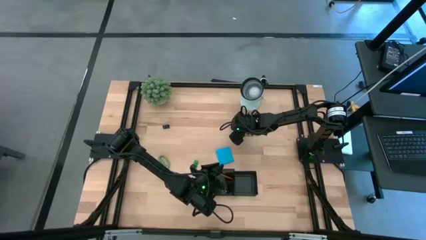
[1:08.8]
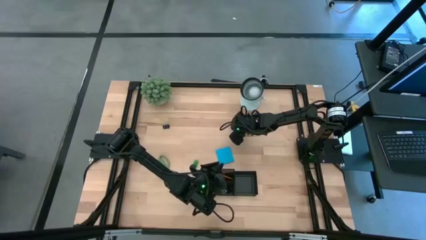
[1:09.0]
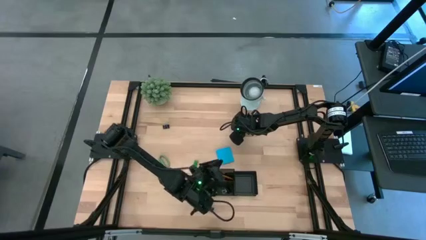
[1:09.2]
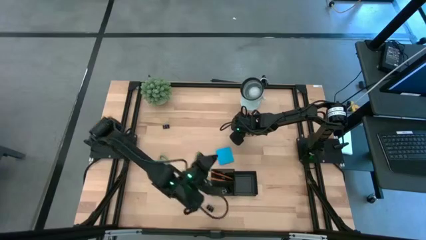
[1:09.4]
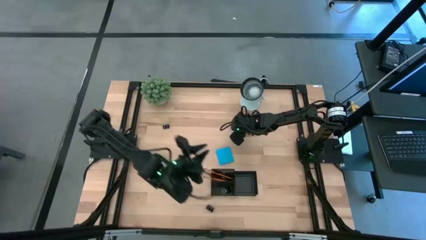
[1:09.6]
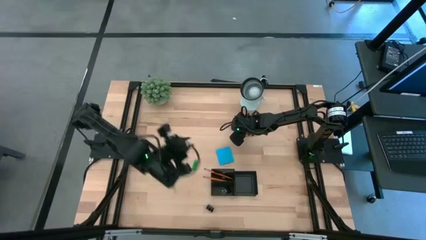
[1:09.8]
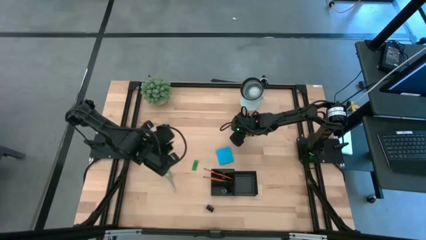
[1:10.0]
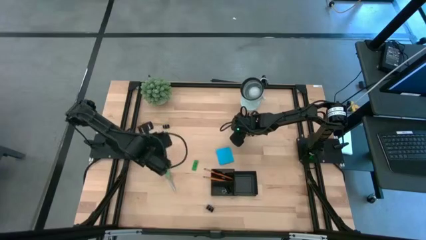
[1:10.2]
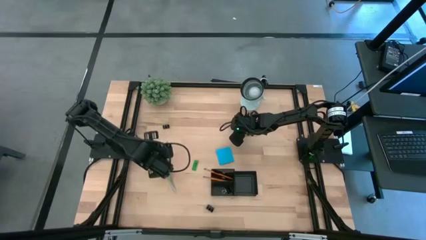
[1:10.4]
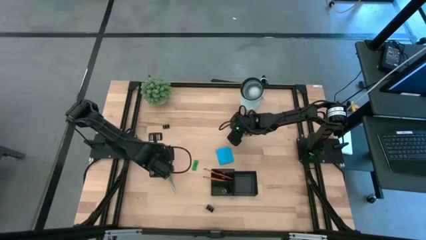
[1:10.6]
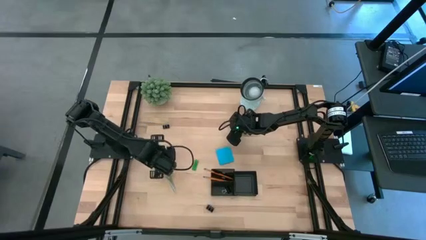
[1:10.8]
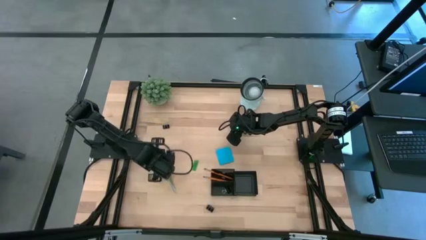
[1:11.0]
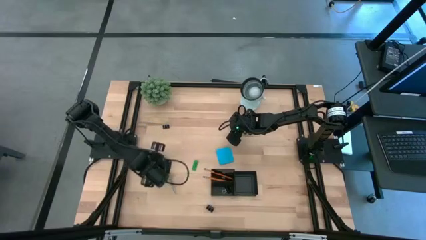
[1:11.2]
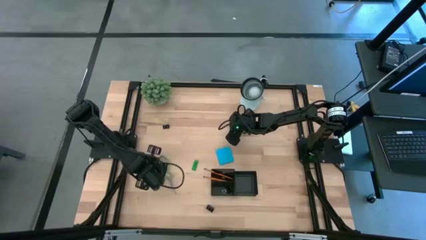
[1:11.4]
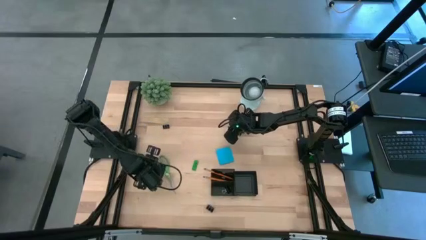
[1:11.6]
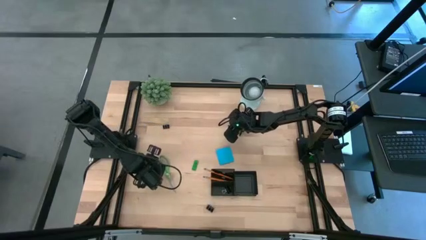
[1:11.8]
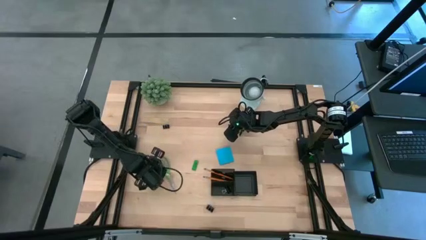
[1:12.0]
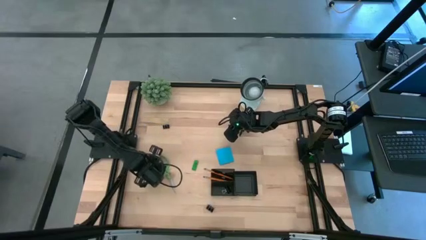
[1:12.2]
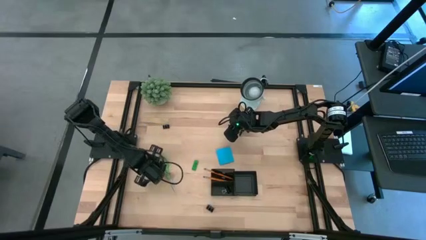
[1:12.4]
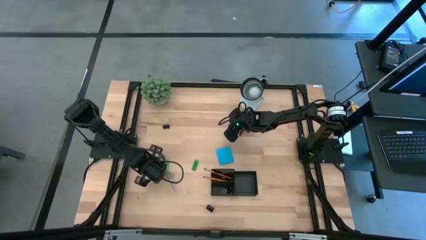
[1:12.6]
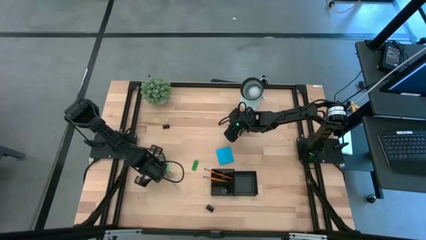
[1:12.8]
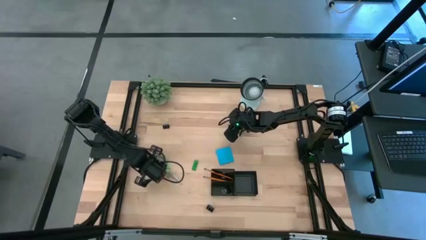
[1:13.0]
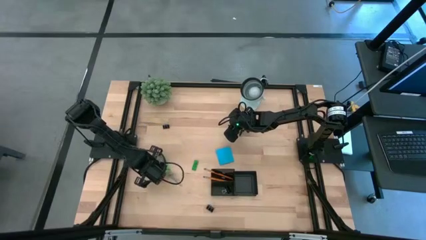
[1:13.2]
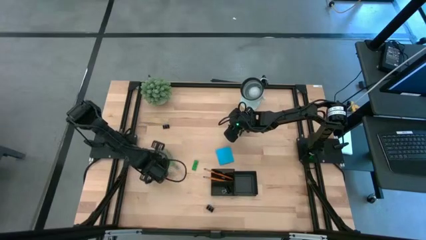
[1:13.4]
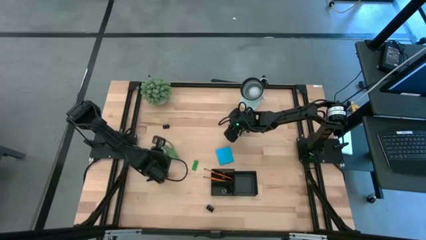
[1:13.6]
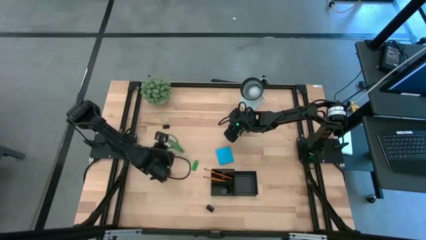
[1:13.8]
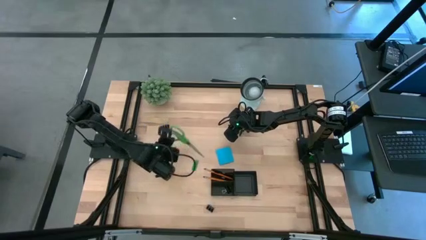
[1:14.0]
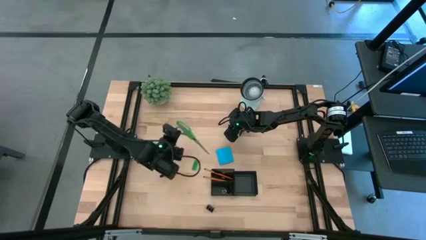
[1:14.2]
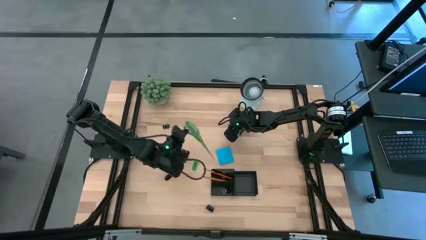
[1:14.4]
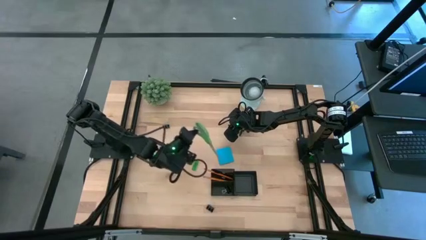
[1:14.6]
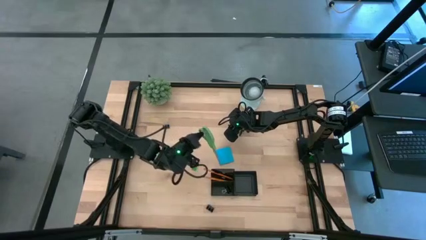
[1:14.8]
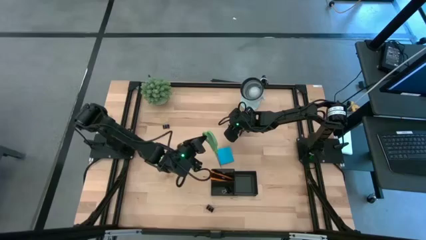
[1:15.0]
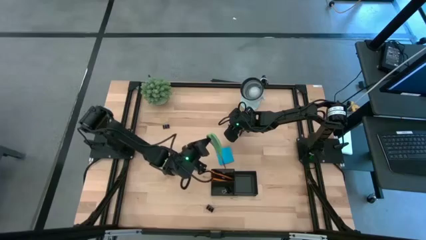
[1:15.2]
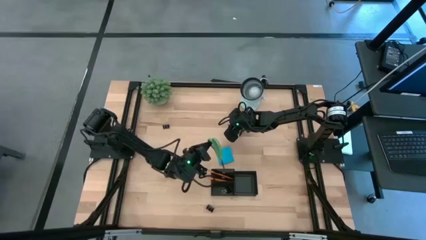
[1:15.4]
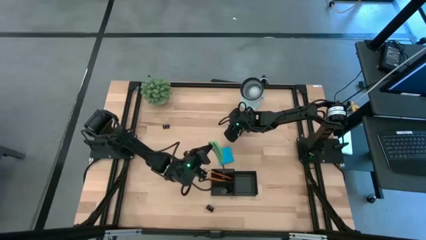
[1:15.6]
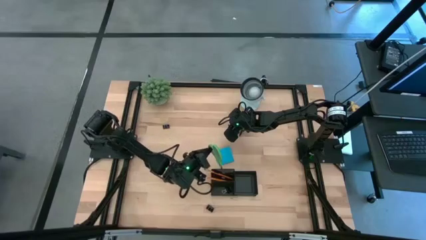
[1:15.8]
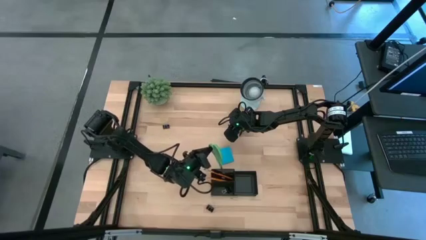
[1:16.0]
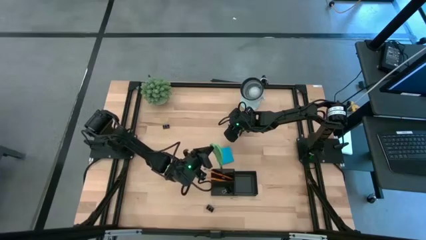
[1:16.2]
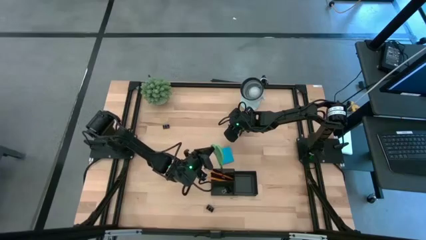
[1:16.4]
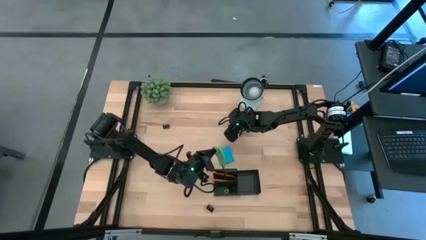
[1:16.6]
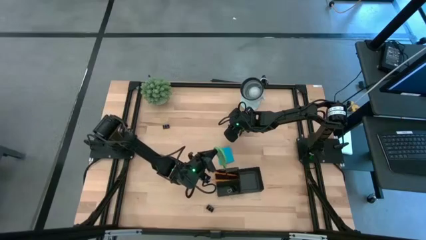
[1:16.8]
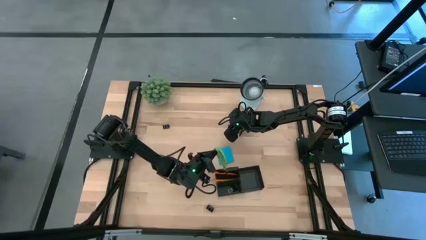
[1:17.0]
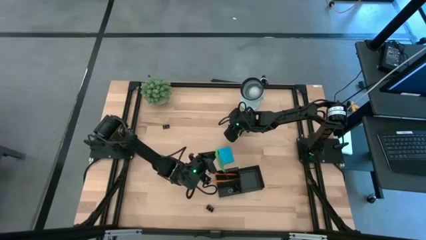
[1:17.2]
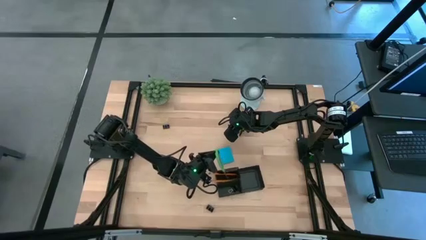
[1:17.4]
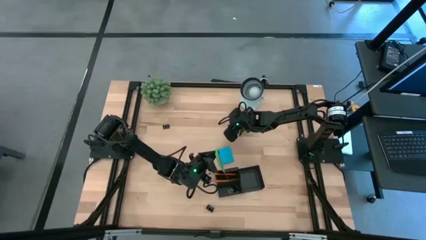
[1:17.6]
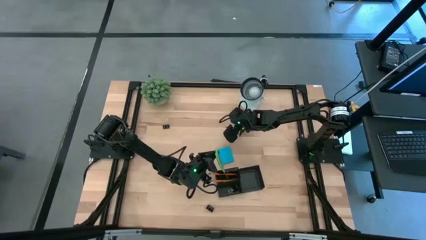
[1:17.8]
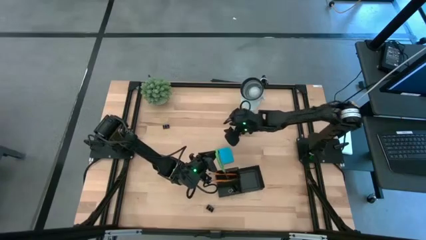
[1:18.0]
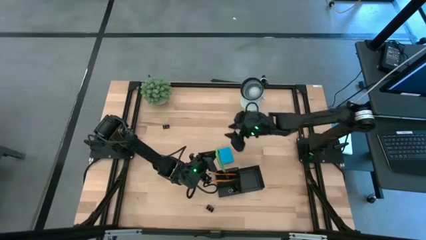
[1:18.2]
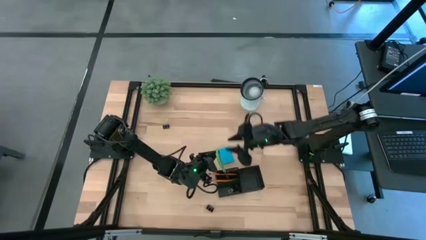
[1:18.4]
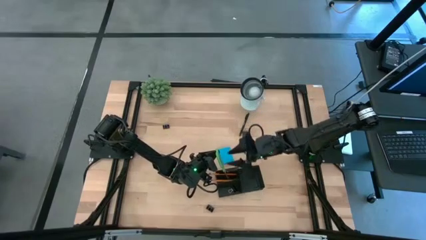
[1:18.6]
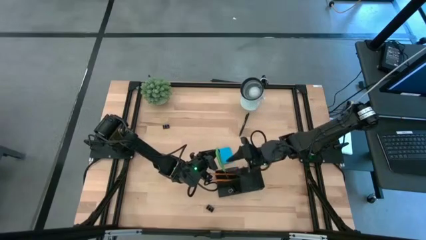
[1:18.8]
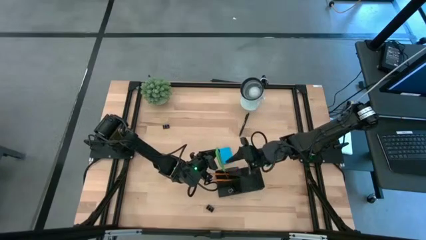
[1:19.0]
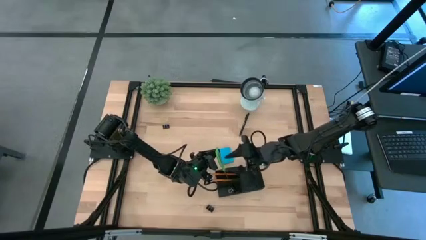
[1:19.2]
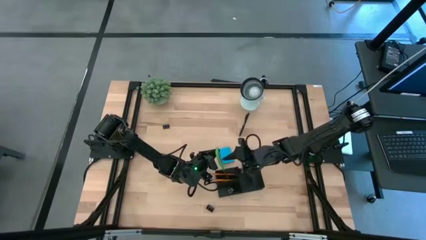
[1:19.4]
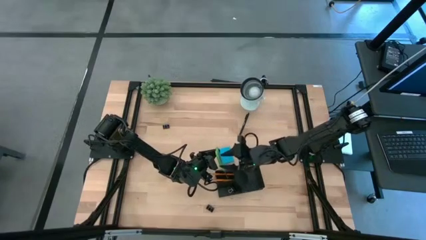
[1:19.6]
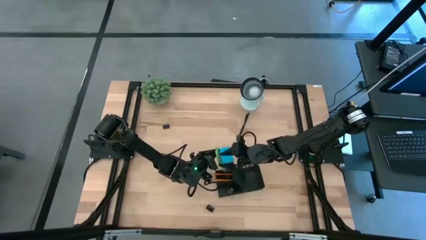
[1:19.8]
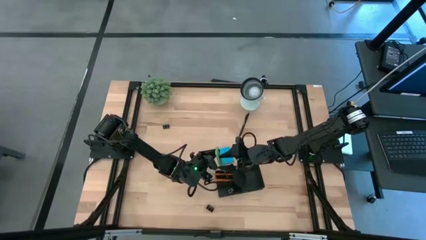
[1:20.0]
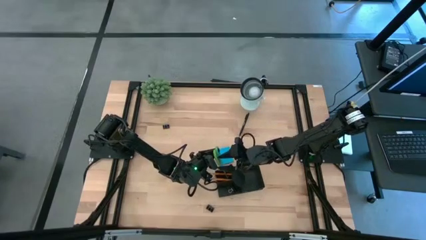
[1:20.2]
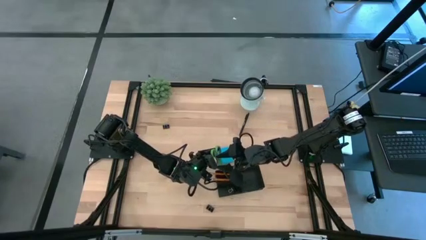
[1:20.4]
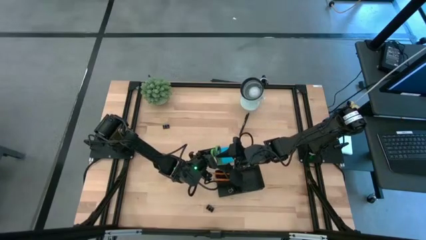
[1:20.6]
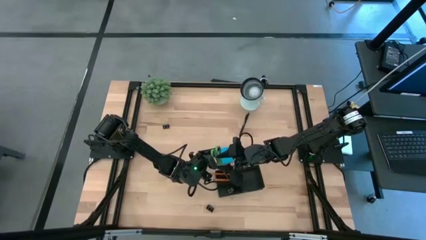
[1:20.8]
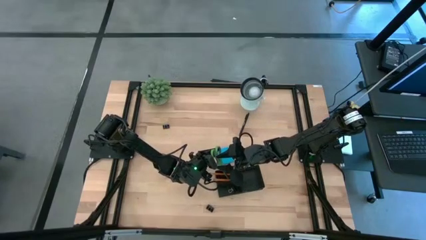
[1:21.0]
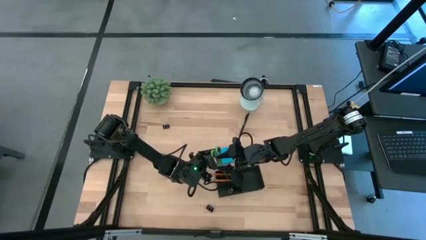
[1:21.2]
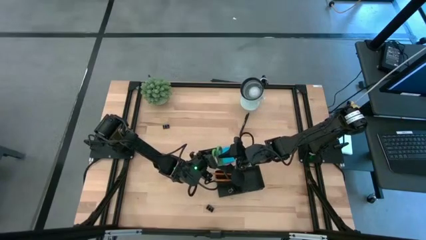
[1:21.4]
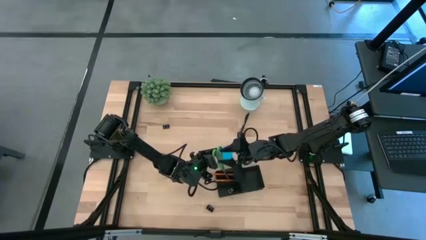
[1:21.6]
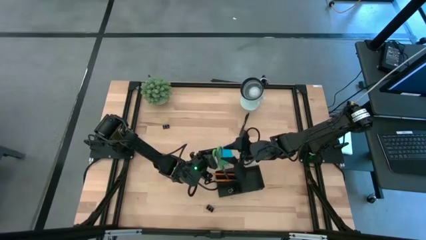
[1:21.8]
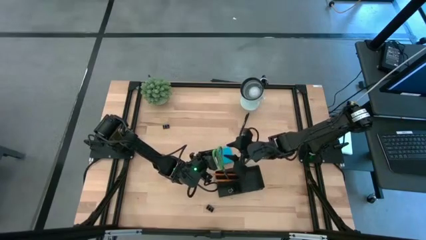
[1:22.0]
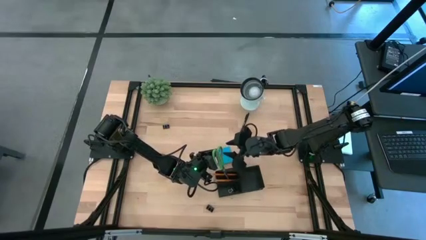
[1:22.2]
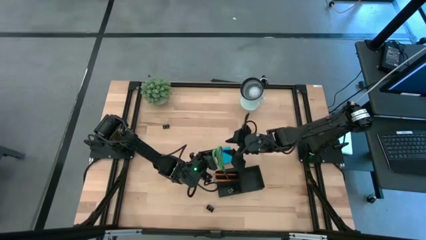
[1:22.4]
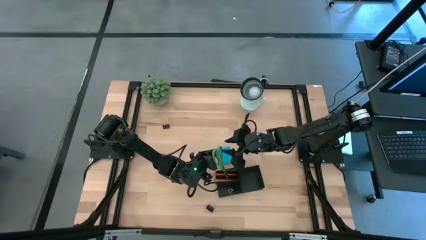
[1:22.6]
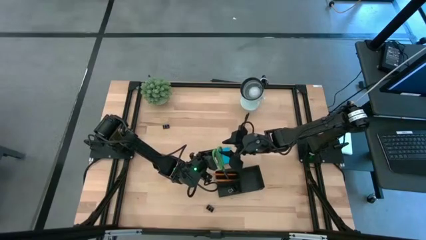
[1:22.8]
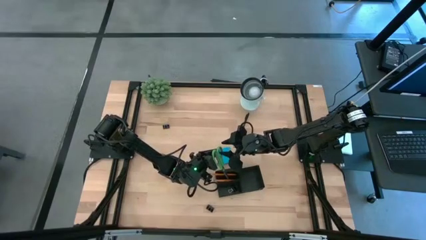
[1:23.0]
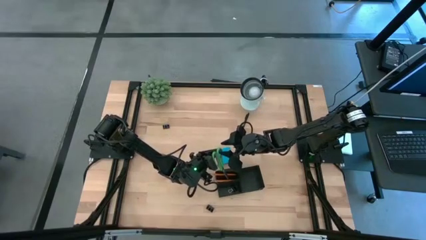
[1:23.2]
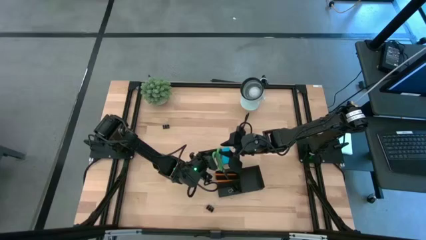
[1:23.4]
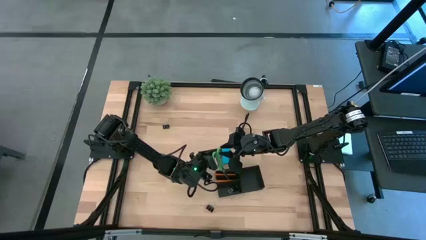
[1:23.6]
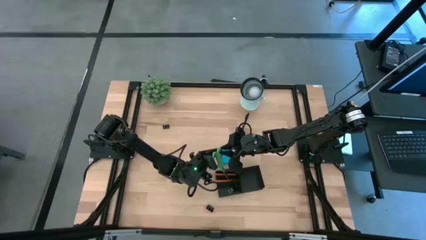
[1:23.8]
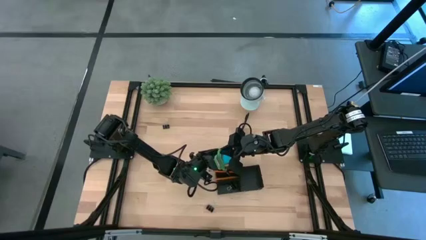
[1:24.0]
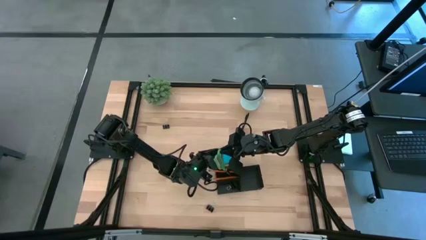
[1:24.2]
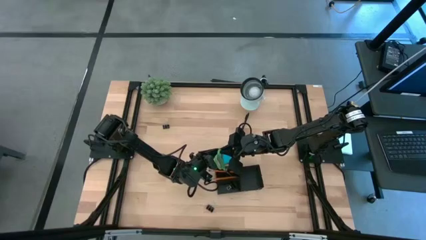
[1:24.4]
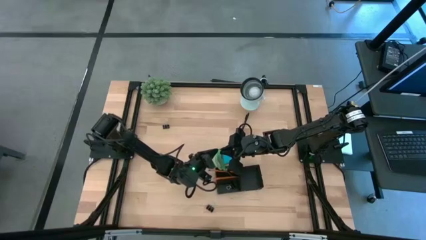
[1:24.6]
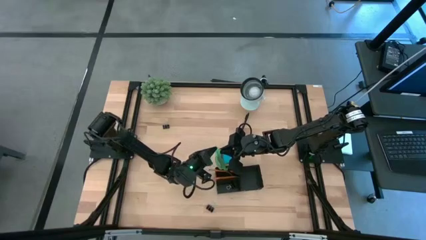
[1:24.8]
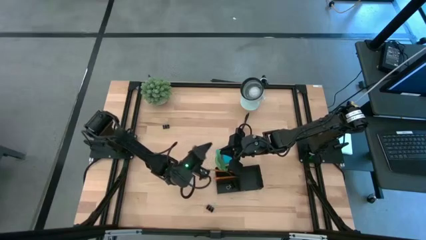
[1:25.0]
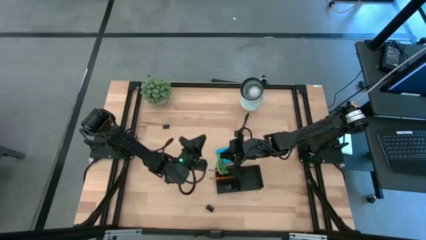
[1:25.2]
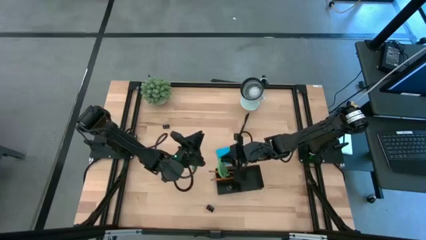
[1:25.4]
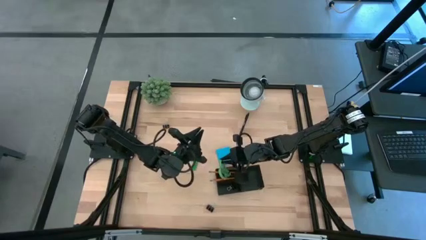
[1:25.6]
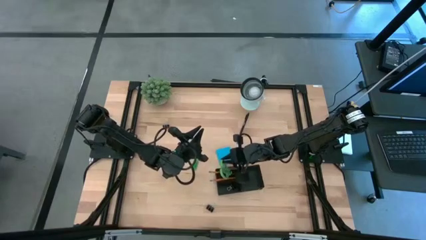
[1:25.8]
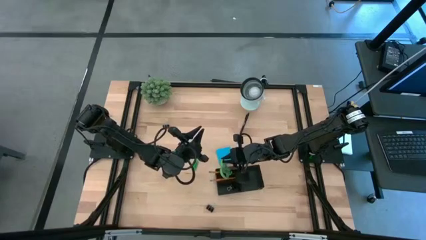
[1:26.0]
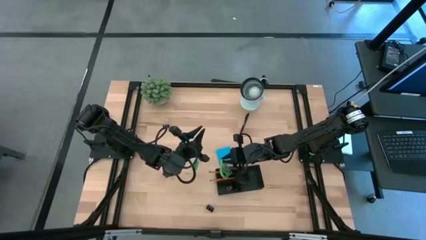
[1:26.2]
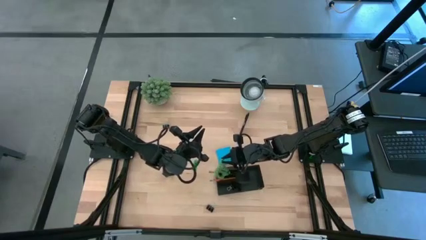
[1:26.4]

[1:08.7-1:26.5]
Task: Pick and place office supplies into organizer
Put the scissors into the top left slot of the desk organizer
